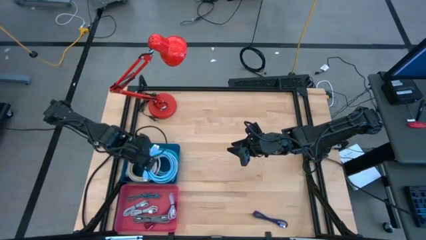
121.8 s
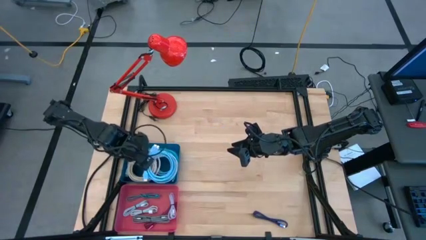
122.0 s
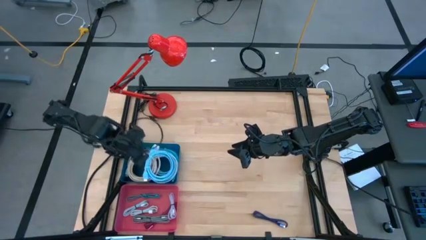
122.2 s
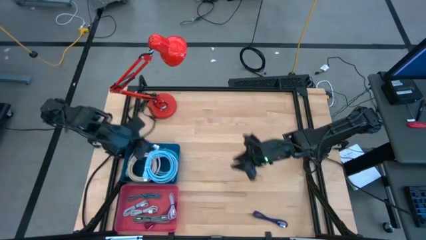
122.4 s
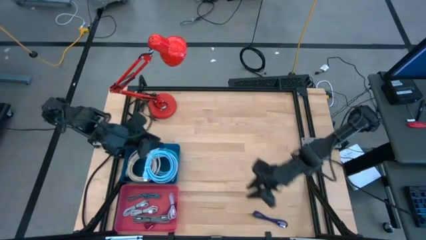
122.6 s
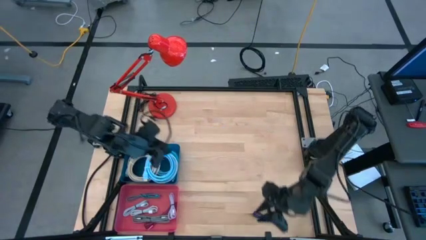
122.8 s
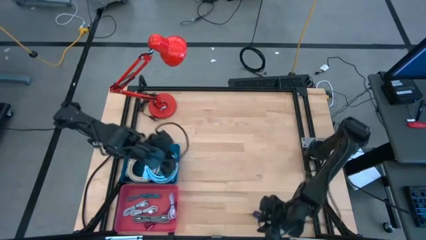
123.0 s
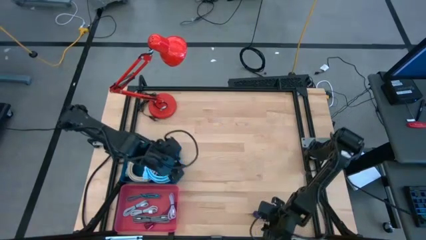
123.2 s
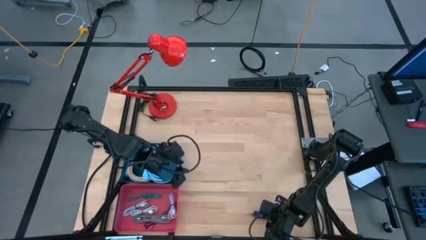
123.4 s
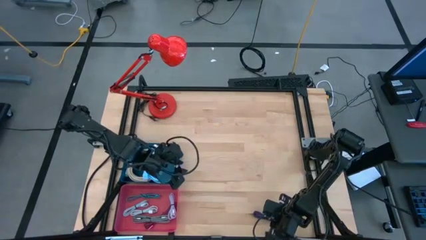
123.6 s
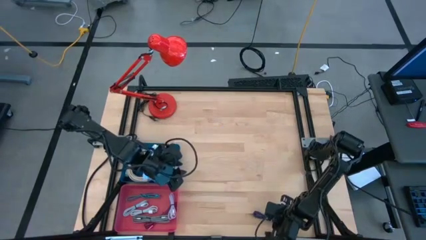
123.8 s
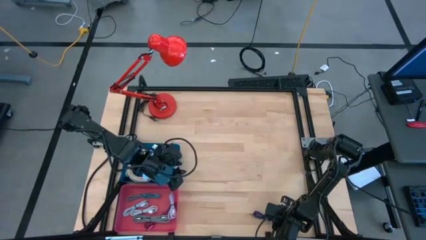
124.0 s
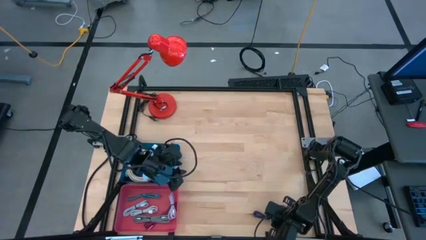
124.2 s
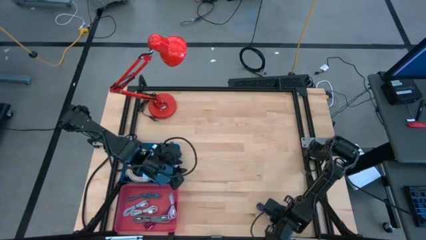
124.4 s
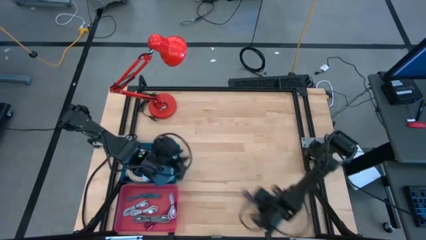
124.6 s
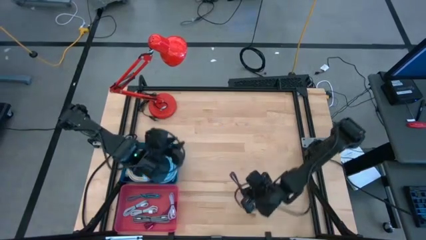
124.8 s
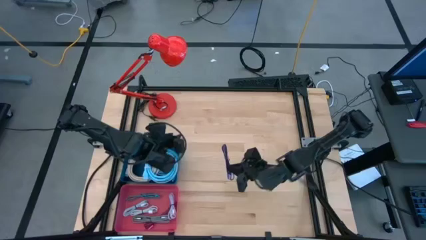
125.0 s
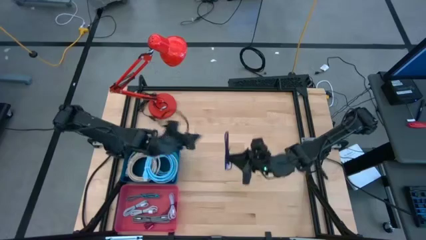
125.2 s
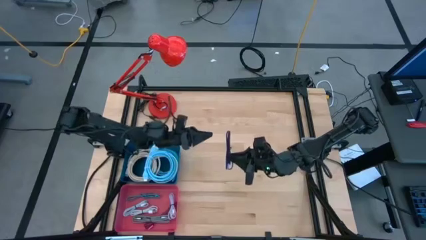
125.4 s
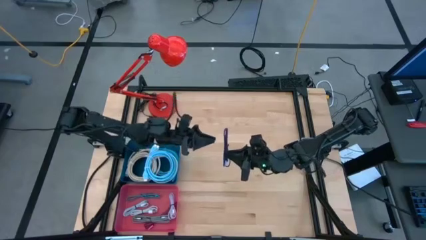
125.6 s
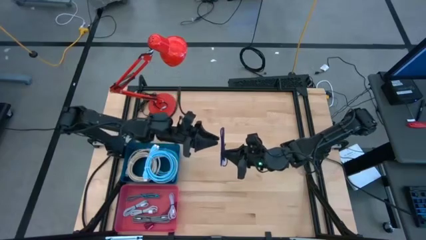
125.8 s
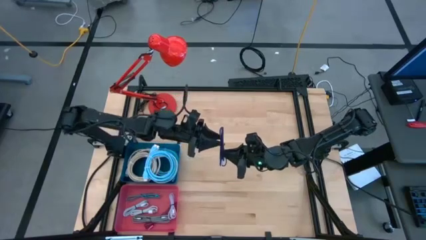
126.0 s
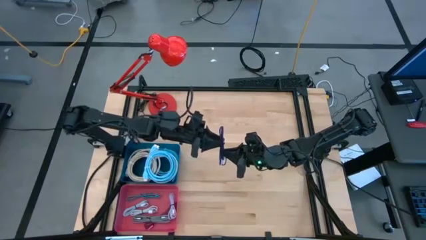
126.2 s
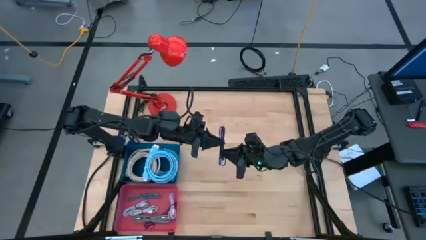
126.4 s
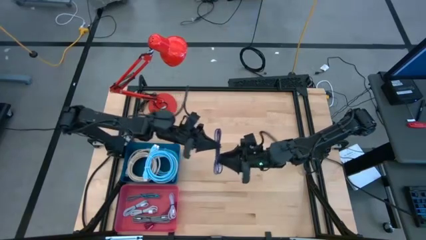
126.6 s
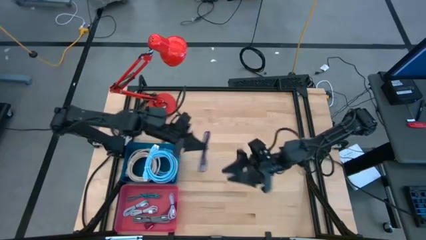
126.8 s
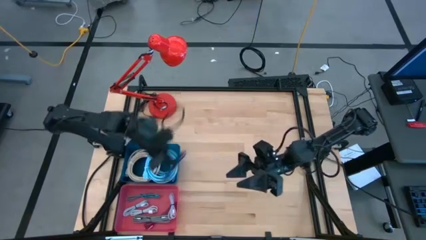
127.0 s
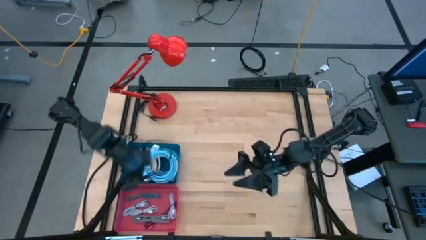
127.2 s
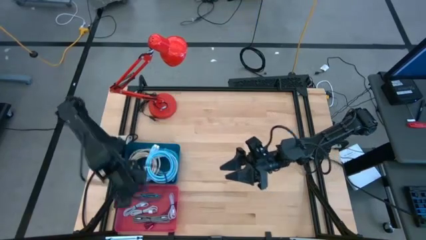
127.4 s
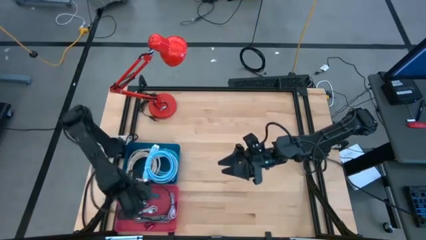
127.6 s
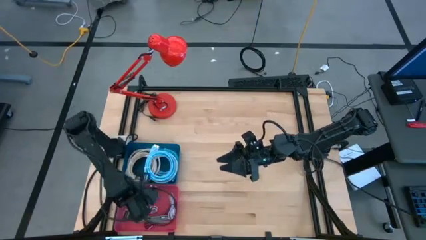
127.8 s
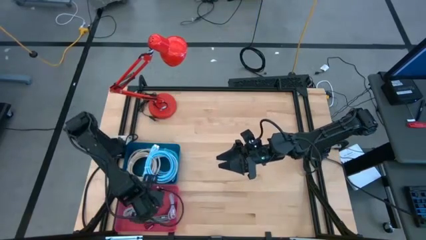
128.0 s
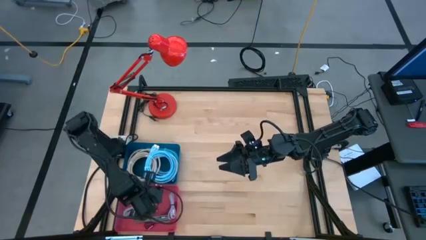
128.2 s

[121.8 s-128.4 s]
Task: Pick & Place USB Port
Put the violet and black USB cable into the red bin

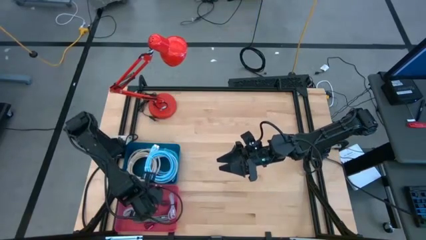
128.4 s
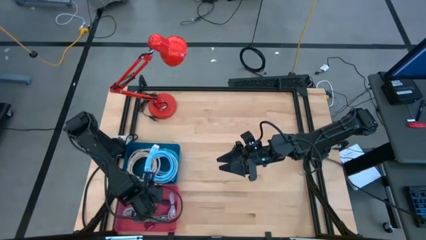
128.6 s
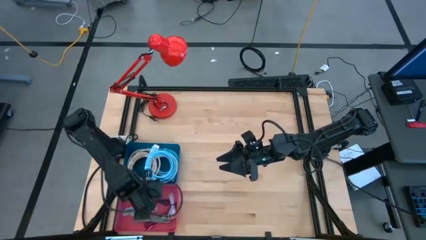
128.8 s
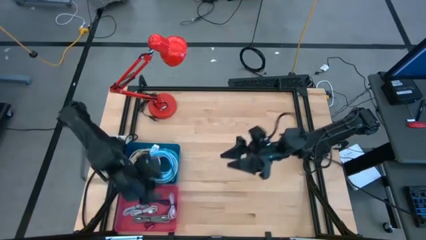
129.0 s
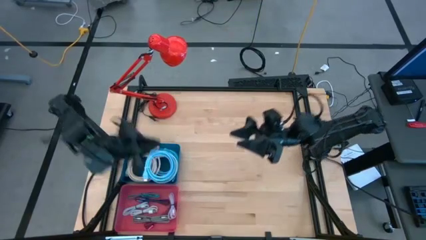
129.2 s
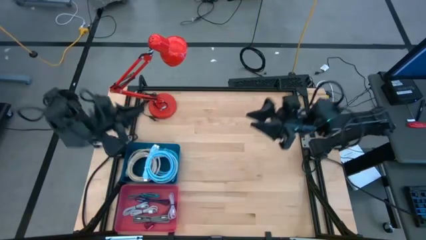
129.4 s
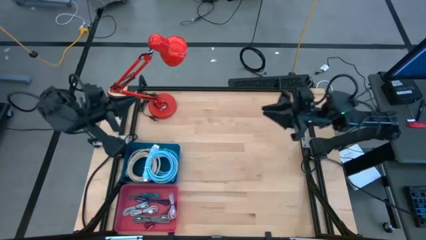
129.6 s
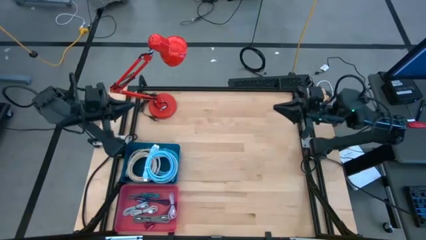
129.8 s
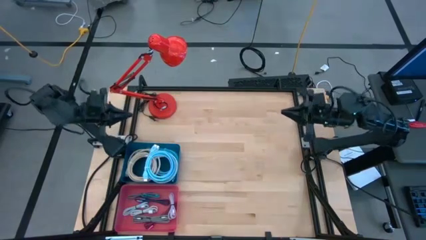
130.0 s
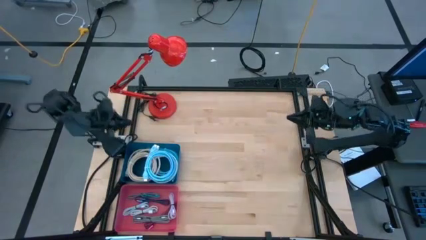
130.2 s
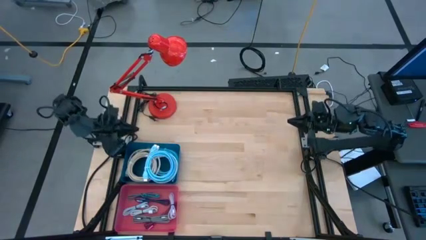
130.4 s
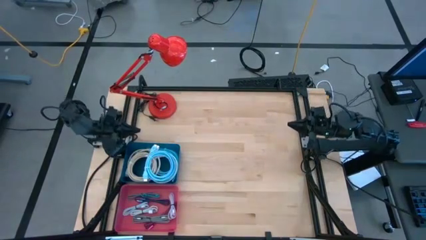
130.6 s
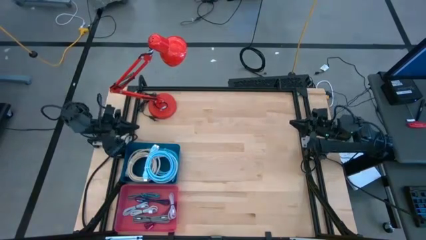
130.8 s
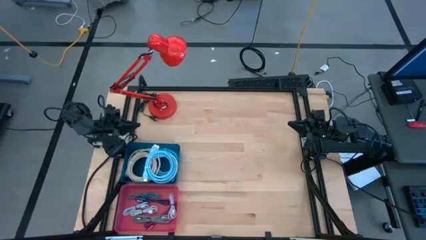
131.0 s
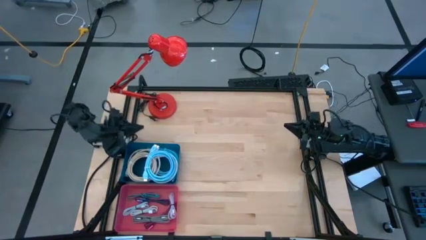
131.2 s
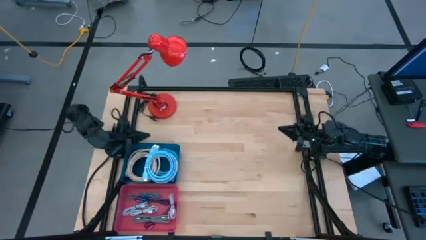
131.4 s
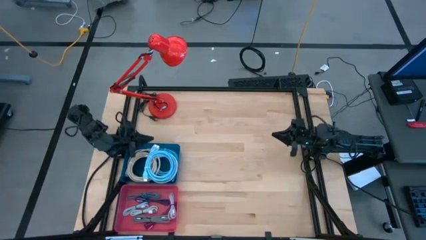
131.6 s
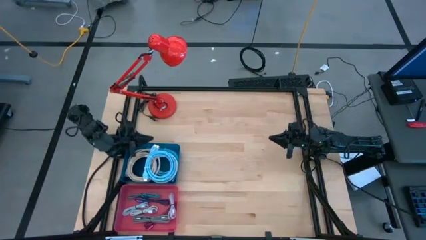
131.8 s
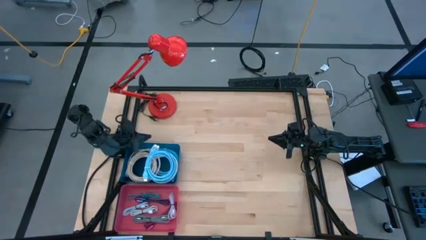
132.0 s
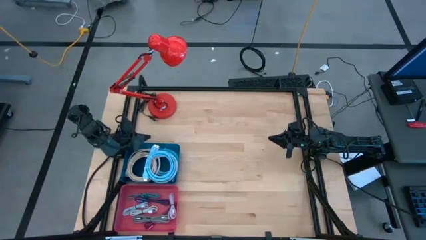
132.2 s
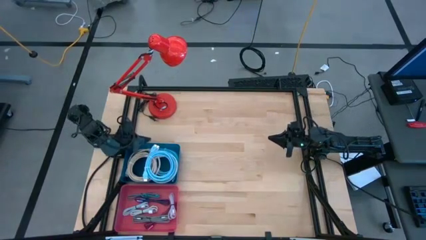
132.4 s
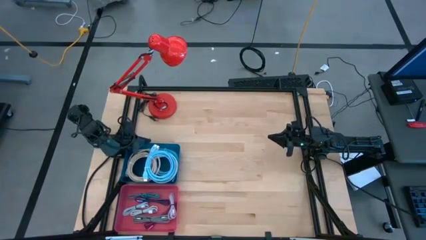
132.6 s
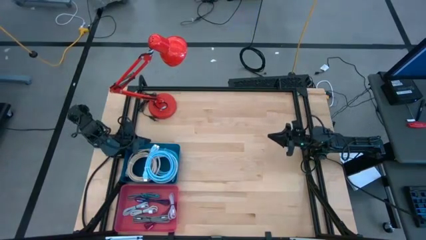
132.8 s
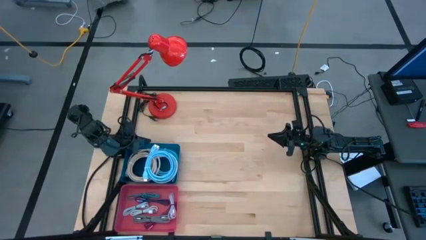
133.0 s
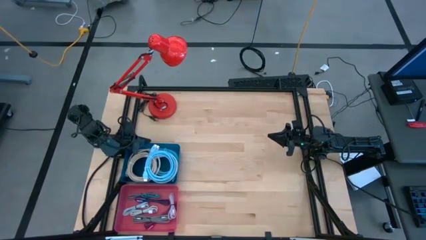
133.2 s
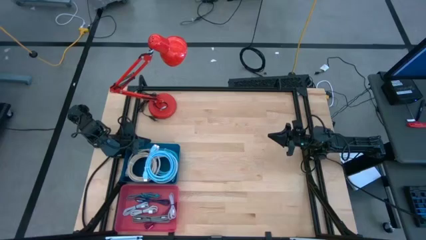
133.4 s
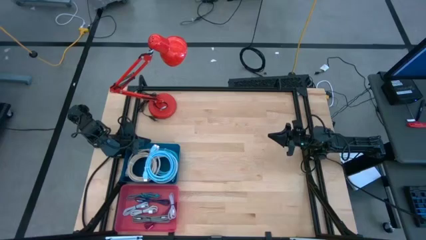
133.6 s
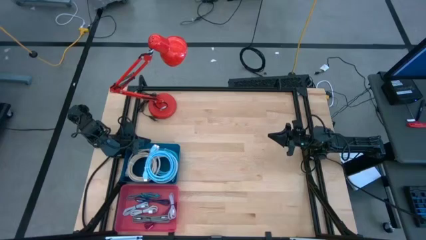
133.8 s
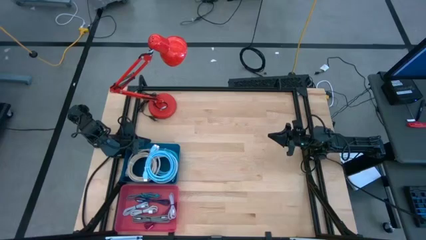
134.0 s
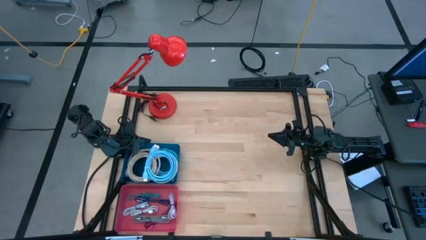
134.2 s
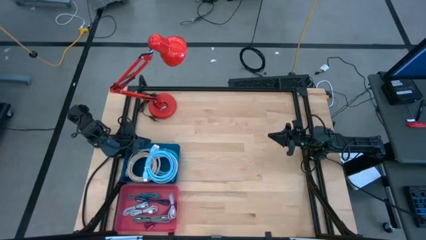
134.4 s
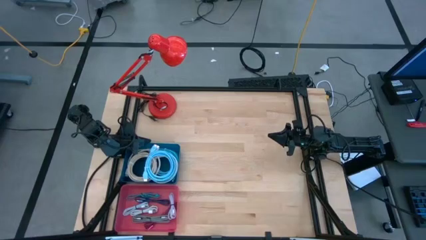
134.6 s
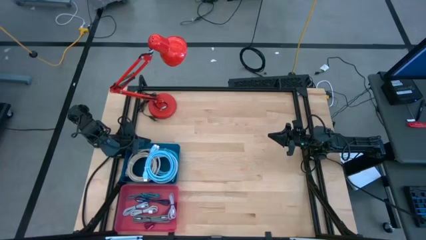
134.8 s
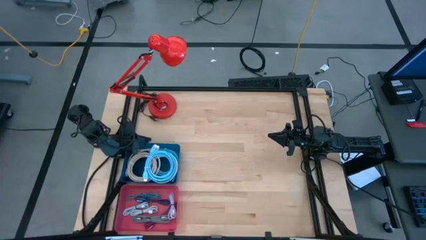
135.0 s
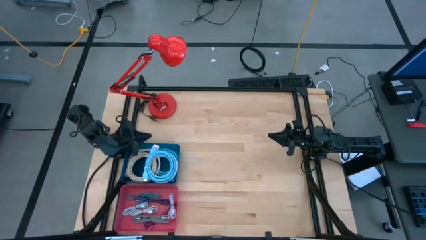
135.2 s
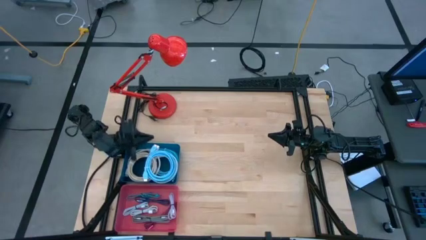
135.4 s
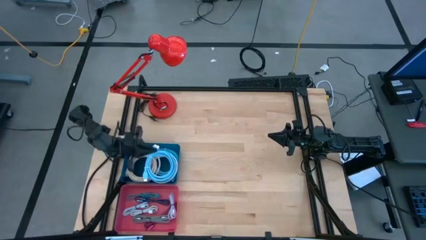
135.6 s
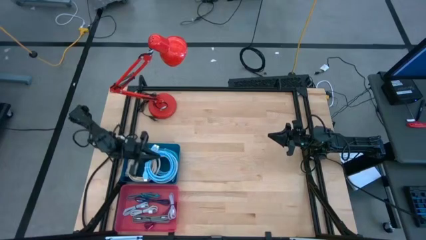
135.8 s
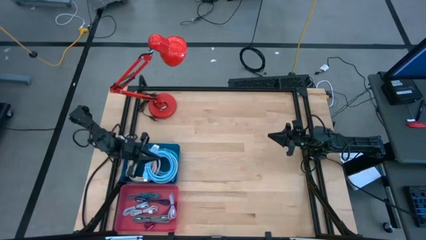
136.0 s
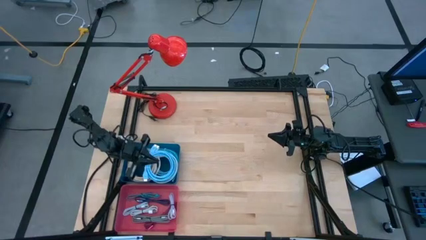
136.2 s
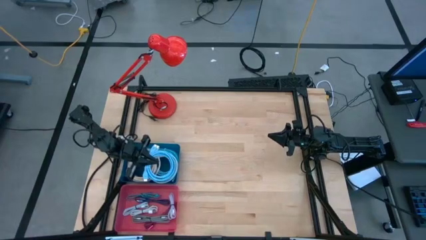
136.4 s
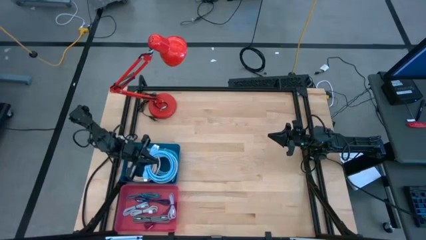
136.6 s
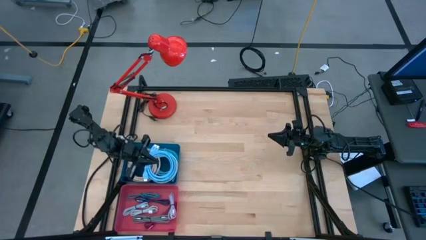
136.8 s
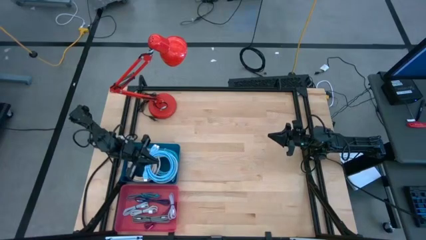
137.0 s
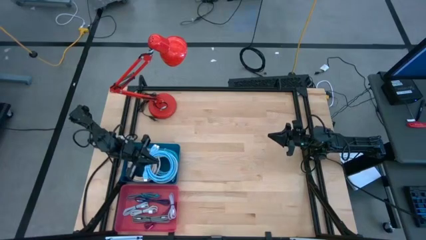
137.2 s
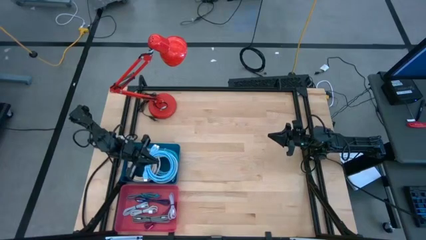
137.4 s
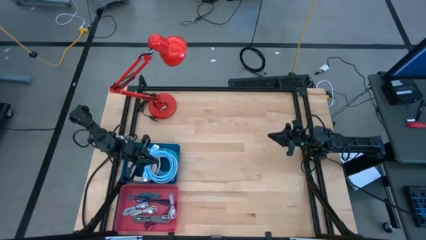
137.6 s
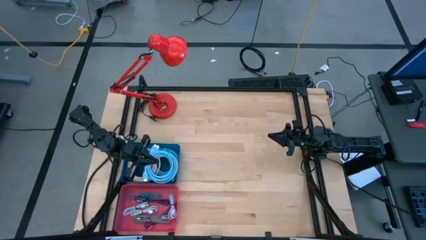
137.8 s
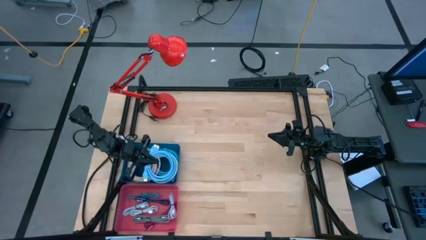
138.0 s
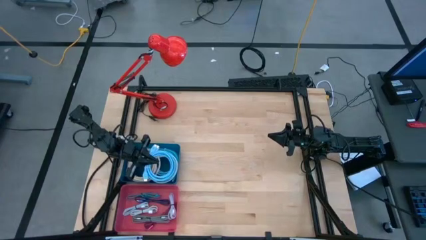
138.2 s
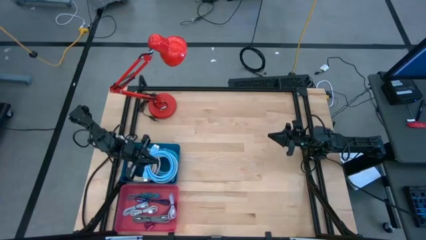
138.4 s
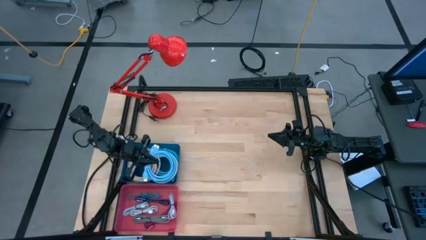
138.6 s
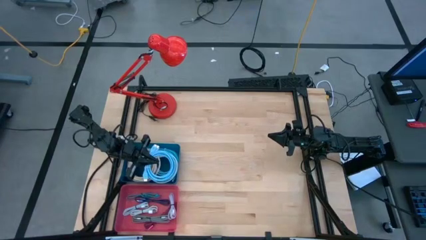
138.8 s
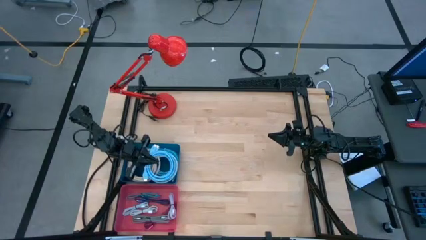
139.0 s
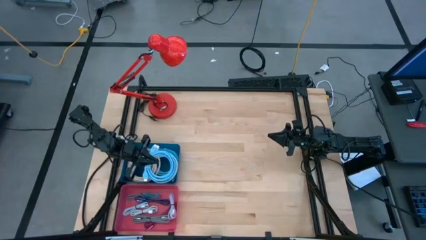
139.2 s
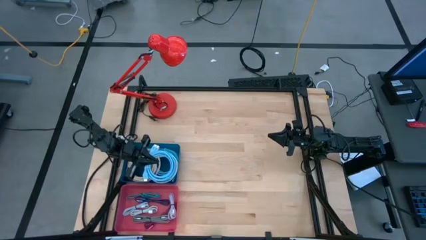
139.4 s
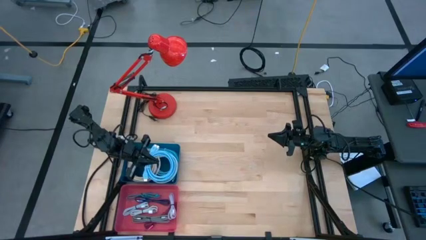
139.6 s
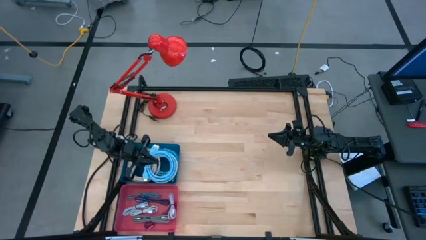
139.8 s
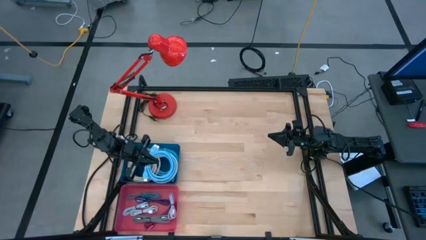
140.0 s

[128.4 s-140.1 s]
Return to Home Position
